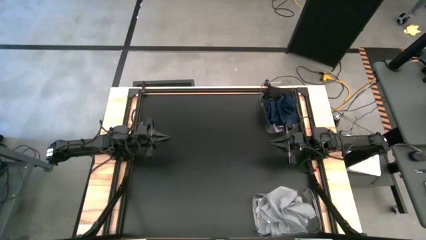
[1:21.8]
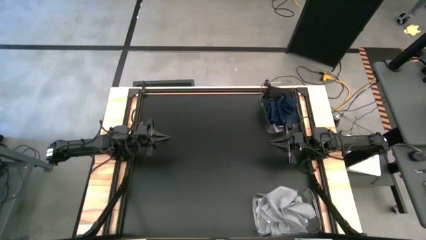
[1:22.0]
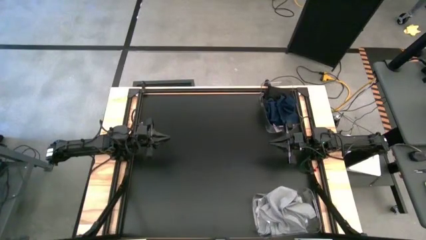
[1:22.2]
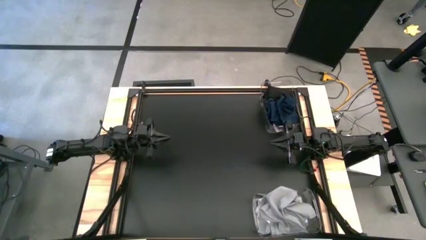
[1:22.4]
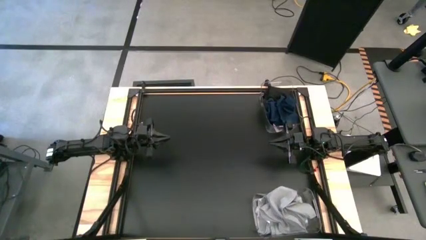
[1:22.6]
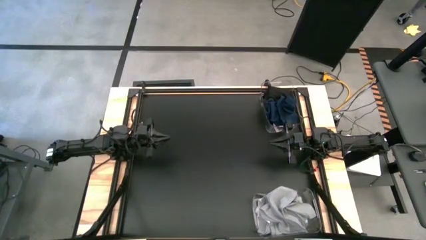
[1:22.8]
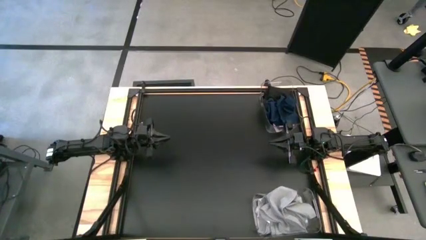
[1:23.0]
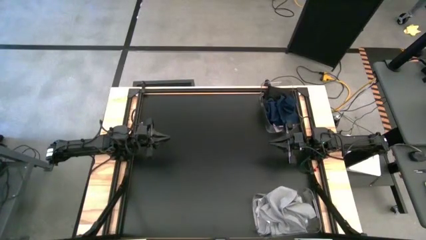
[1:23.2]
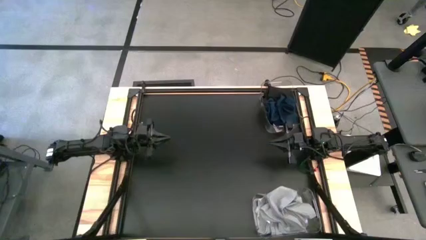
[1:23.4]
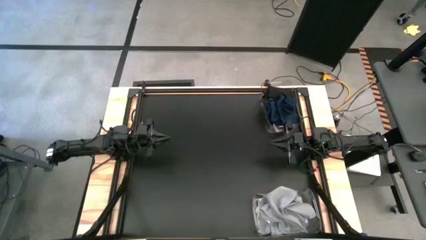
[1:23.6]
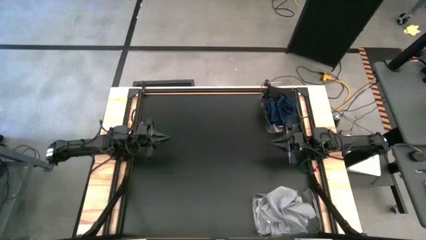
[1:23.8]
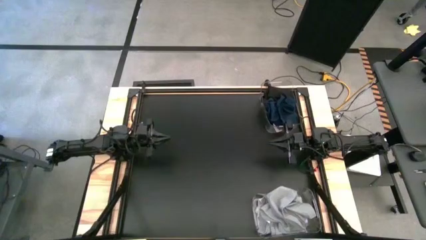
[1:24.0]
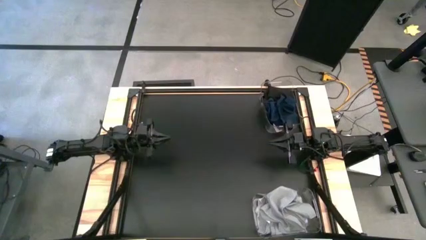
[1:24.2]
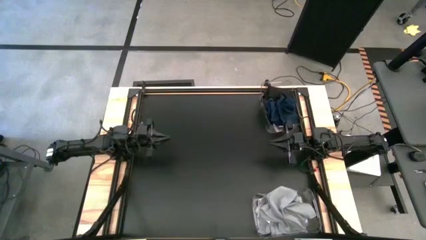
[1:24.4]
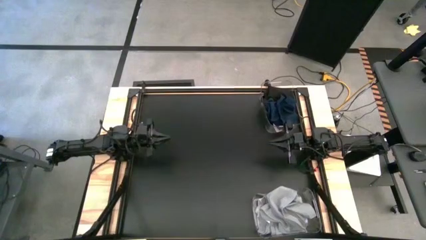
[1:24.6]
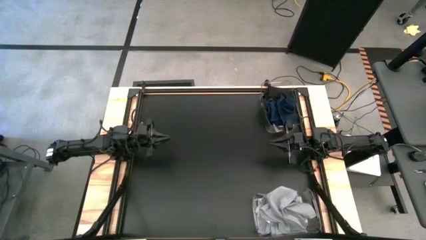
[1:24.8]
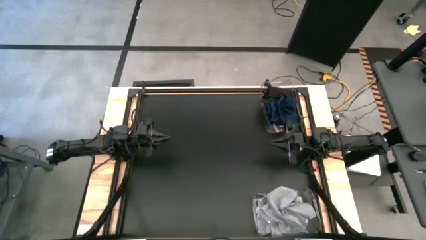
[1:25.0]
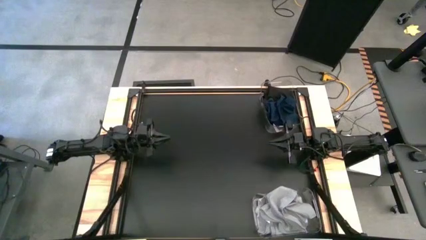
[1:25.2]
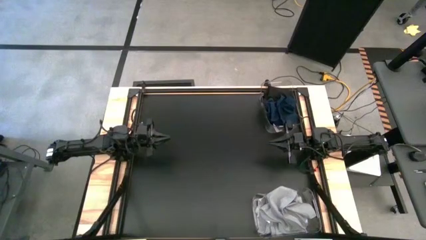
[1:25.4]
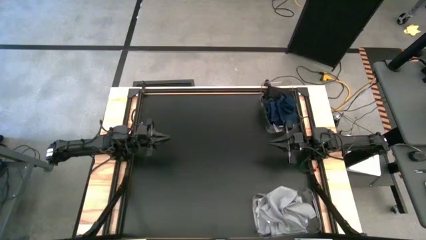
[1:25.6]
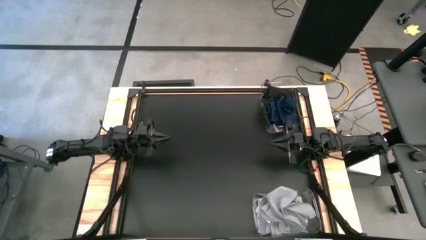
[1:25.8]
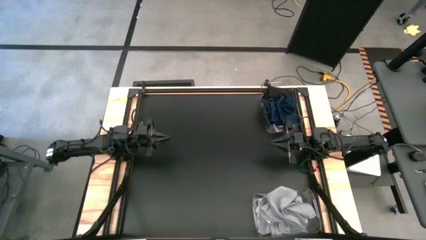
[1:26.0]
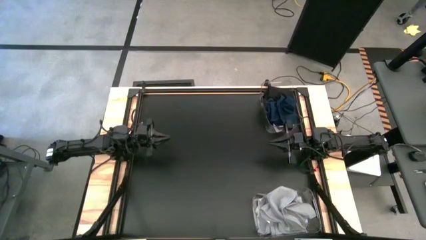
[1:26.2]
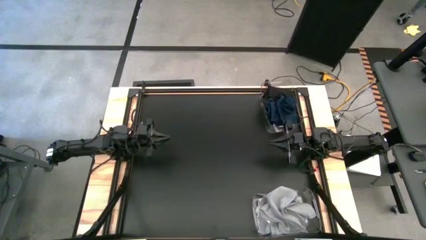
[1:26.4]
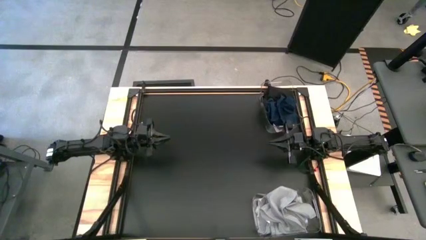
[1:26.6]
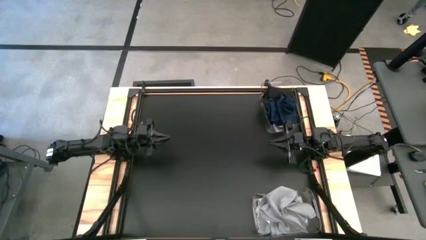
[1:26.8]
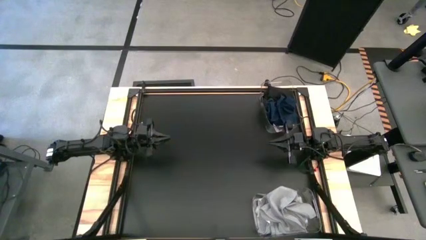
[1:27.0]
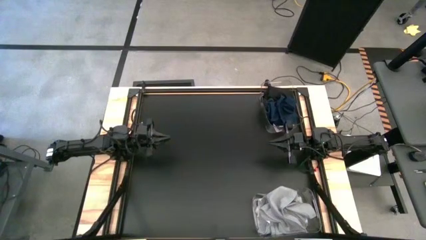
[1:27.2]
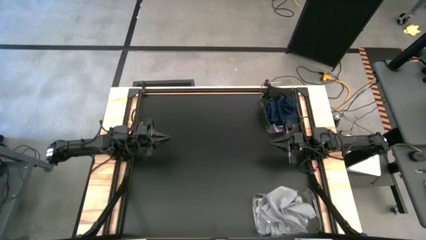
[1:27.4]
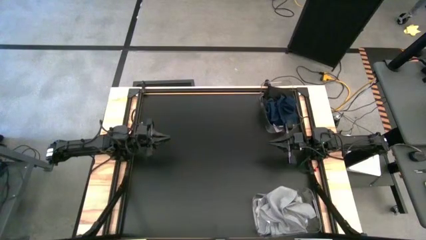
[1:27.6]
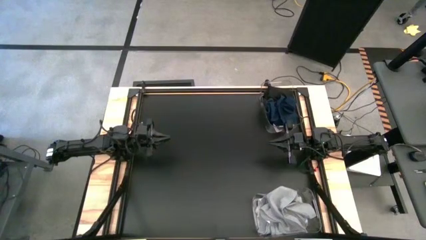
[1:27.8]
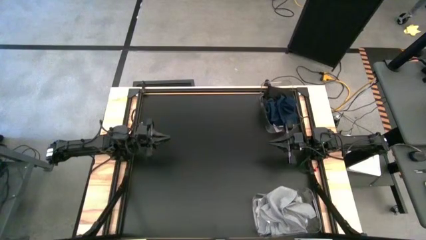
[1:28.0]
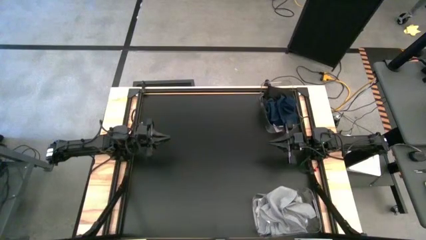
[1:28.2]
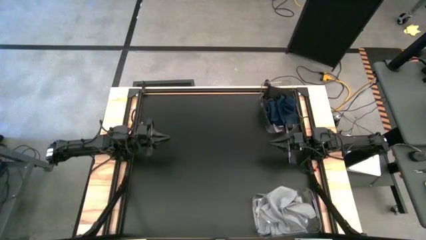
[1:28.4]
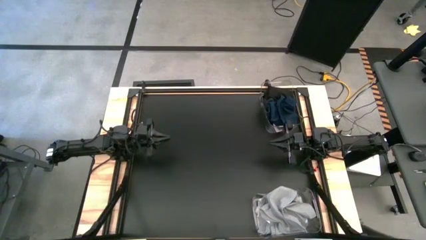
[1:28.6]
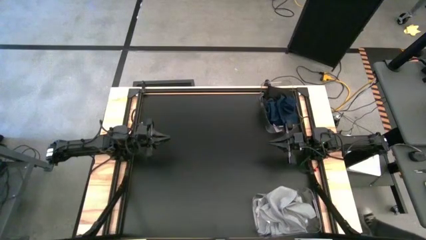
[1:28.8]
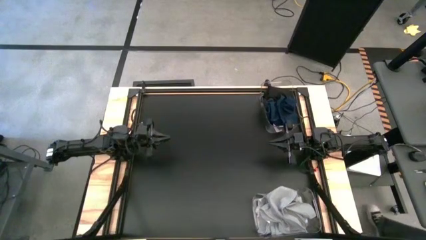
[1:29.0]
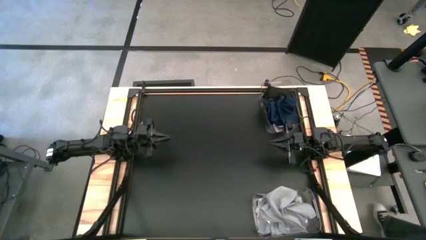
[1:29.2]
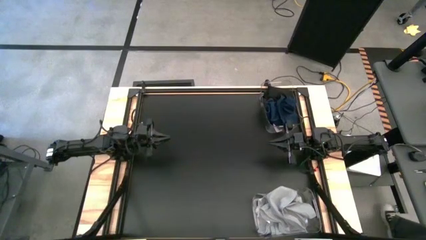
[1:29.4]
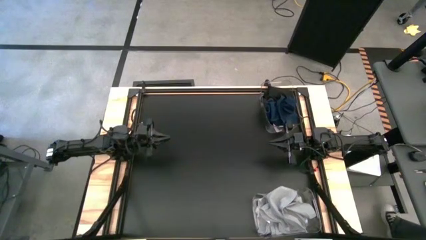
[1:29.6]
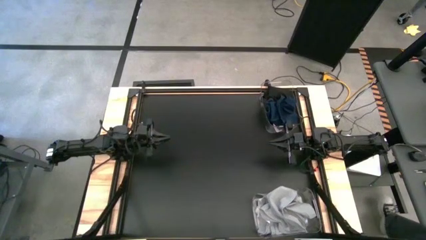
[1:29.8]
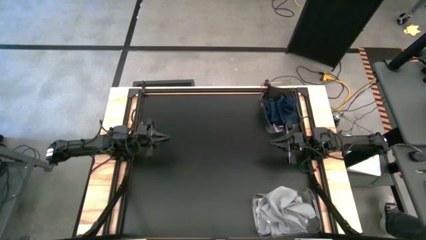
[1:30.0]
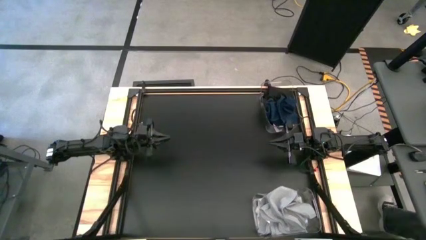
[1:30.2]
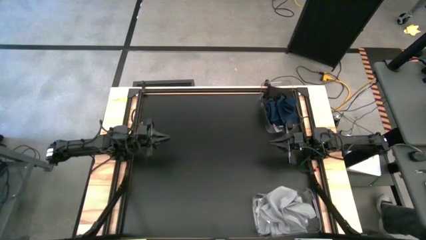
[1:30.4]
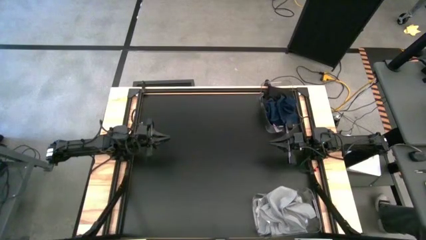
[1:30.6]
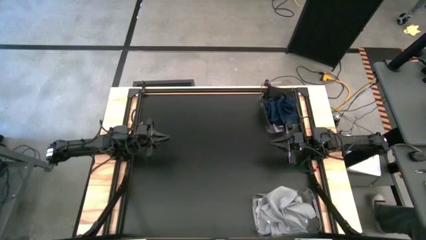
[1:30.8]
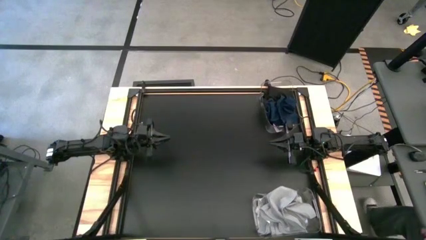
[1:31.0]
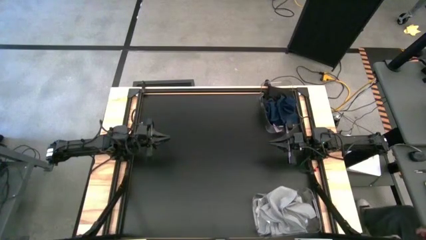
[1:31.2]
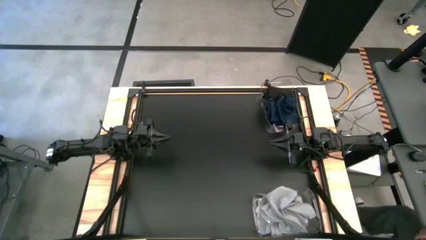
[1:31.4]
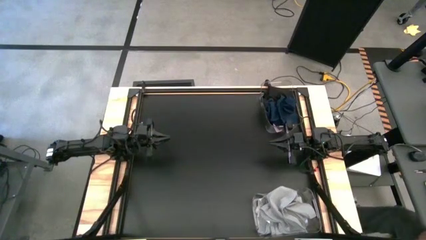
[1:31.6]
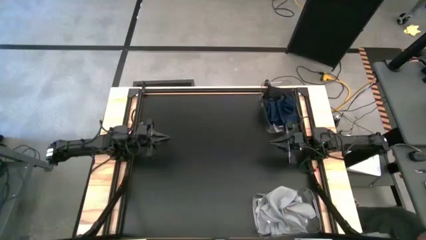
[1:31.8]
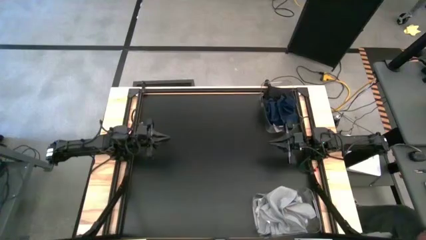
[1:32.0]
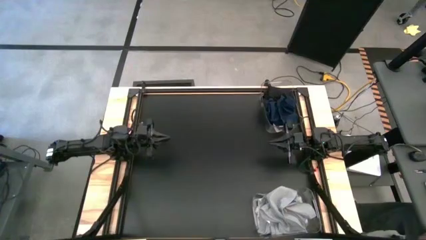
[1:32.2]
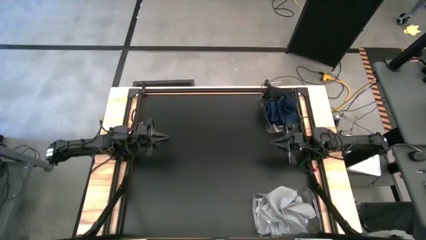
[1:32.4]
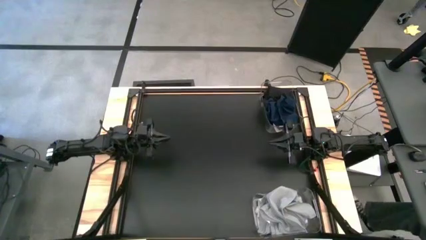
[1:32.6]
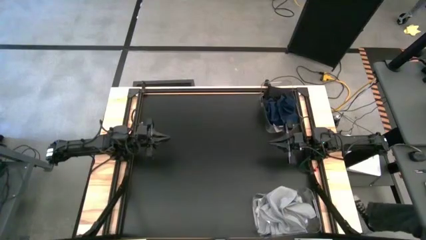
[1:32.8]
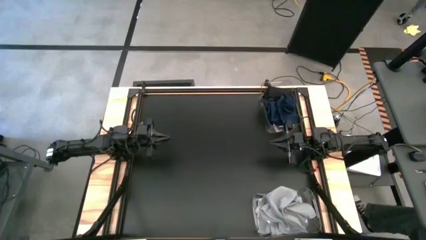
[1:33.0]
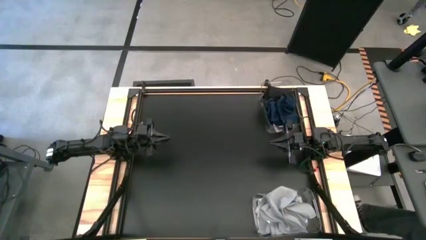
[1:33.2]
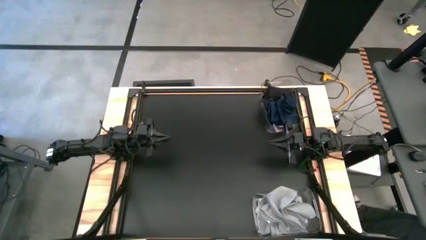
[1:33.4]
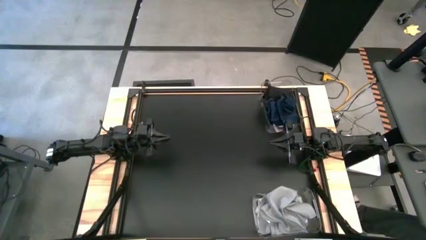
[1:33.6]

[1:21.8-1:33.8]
Task: Sort towels by color in basket
Return to Home Position
